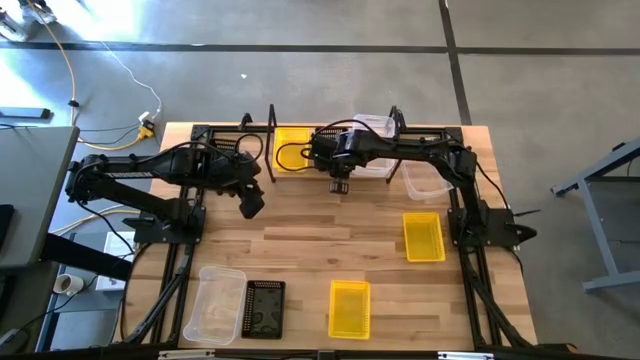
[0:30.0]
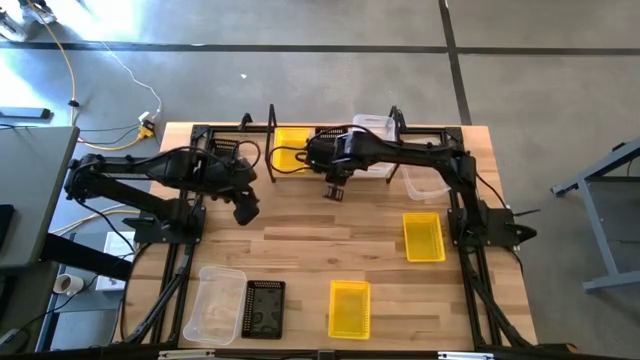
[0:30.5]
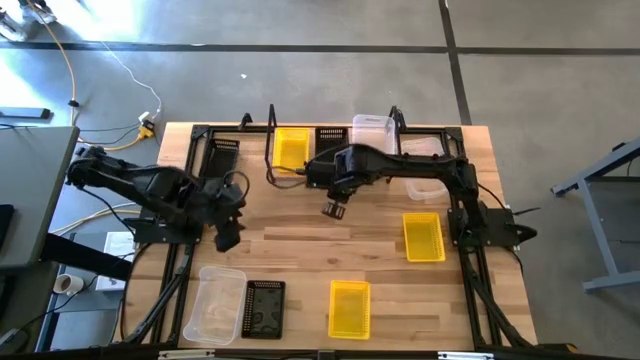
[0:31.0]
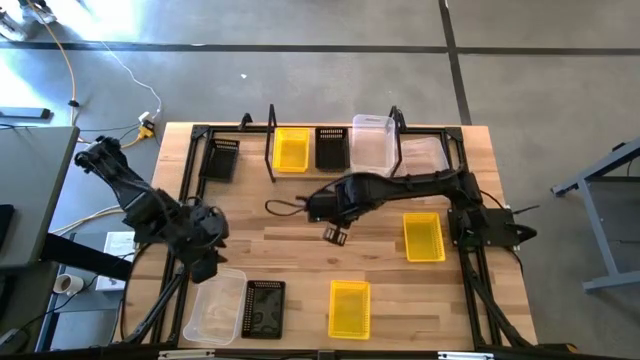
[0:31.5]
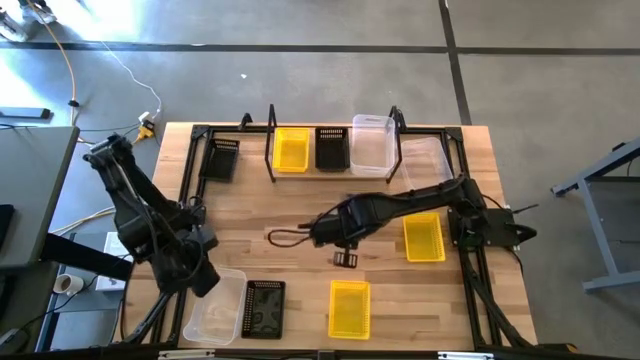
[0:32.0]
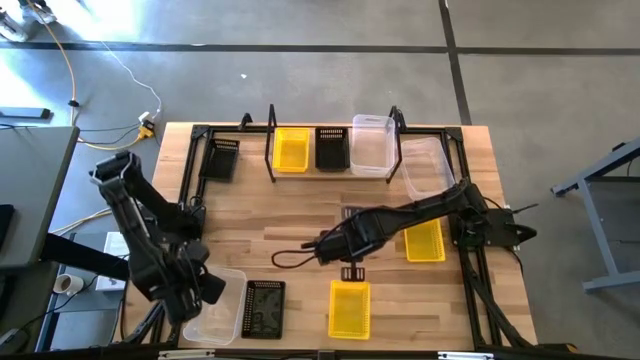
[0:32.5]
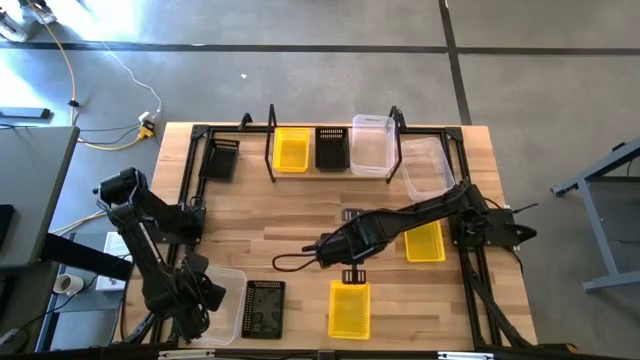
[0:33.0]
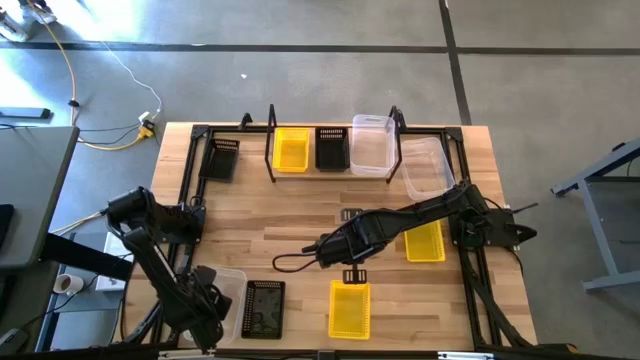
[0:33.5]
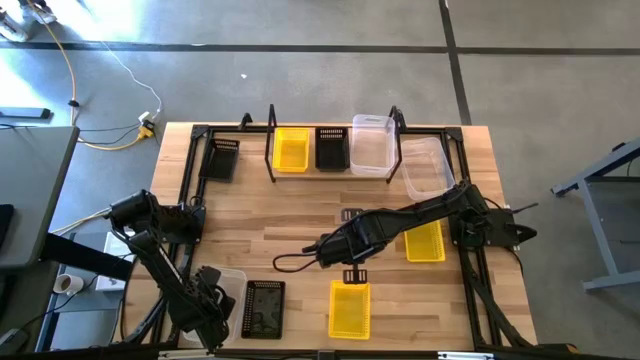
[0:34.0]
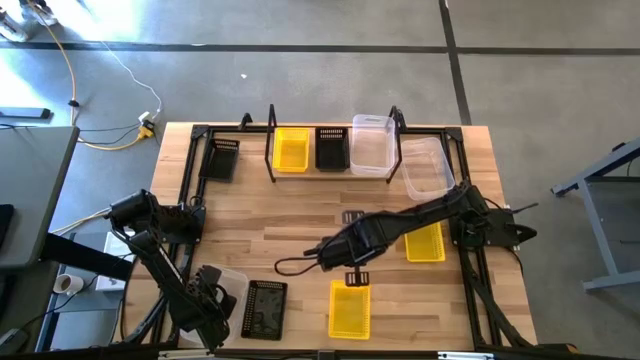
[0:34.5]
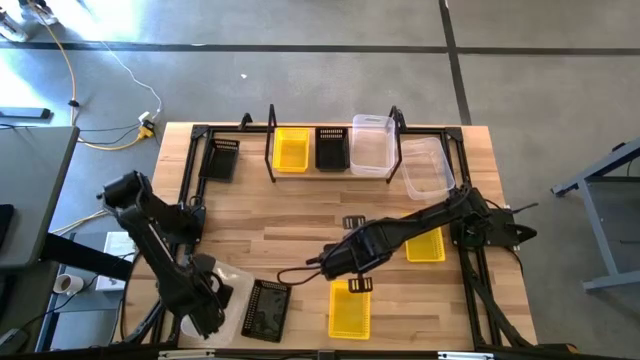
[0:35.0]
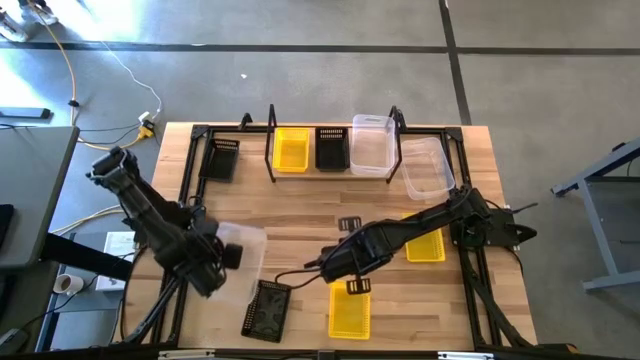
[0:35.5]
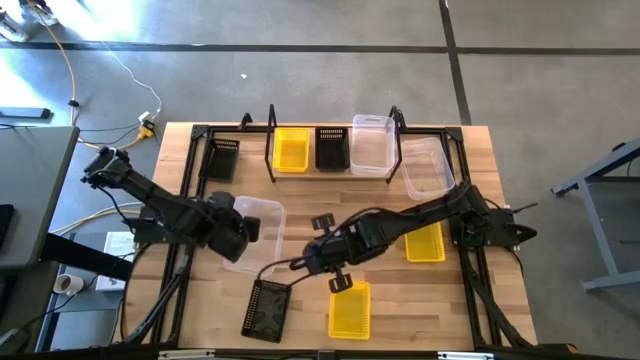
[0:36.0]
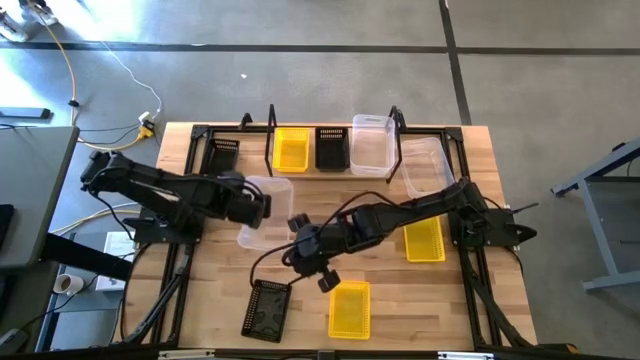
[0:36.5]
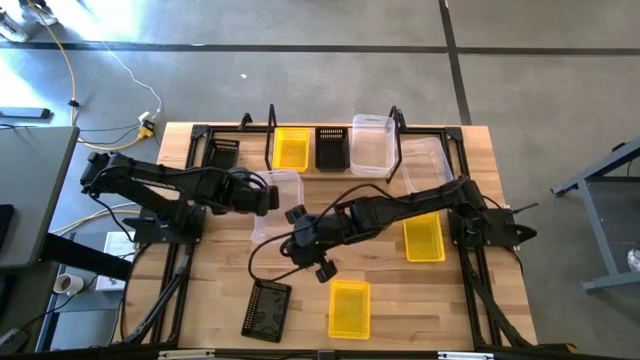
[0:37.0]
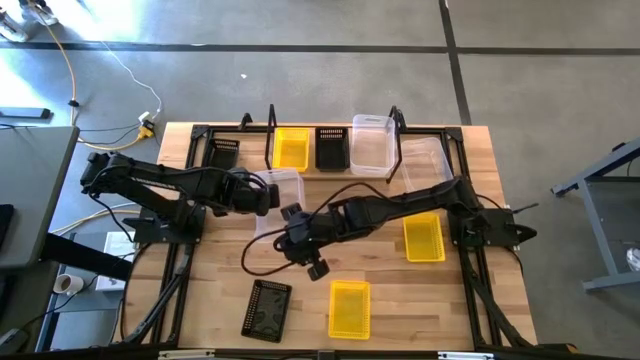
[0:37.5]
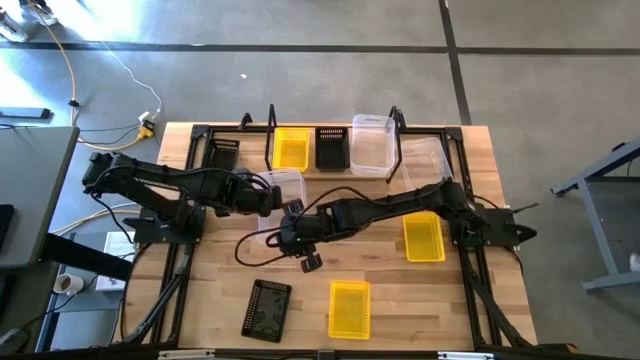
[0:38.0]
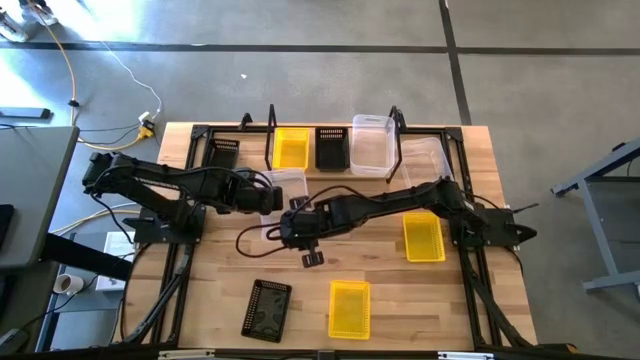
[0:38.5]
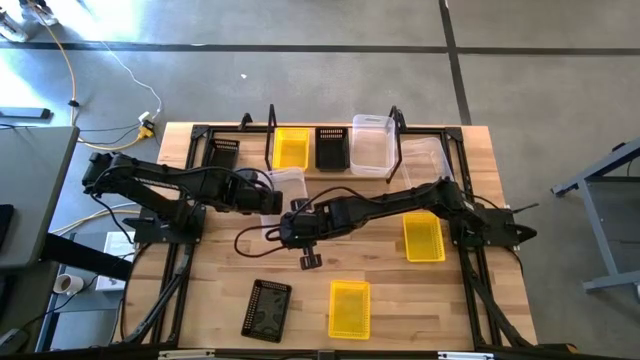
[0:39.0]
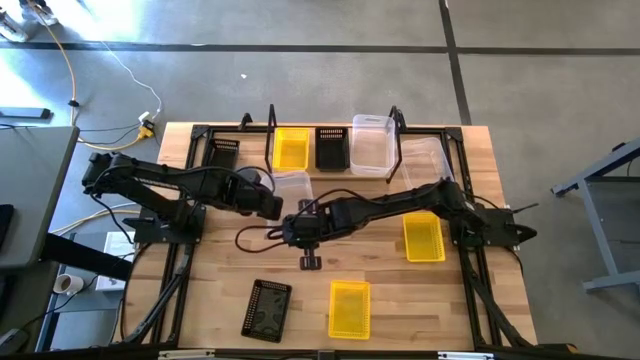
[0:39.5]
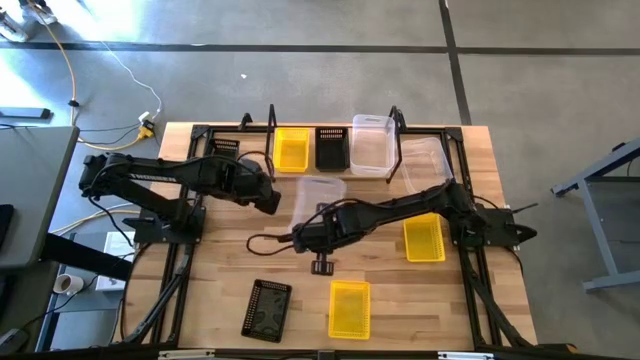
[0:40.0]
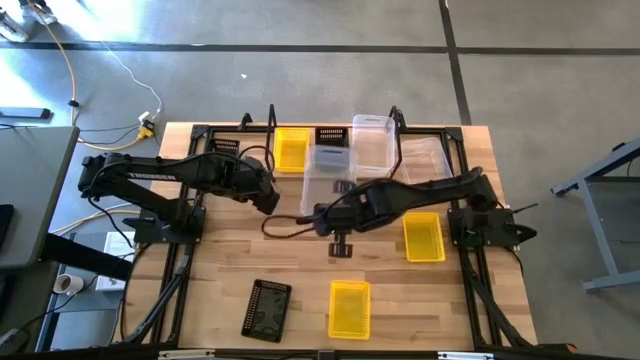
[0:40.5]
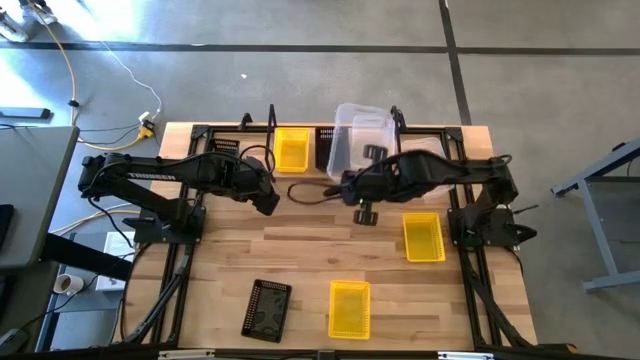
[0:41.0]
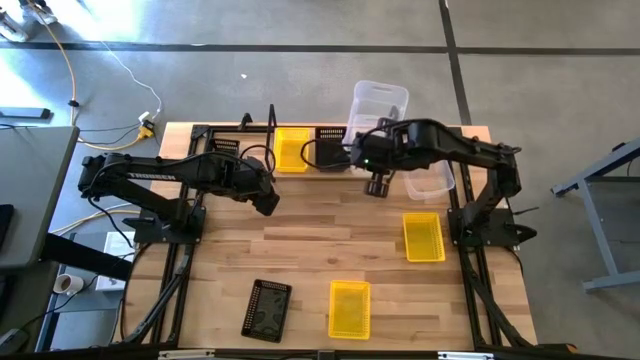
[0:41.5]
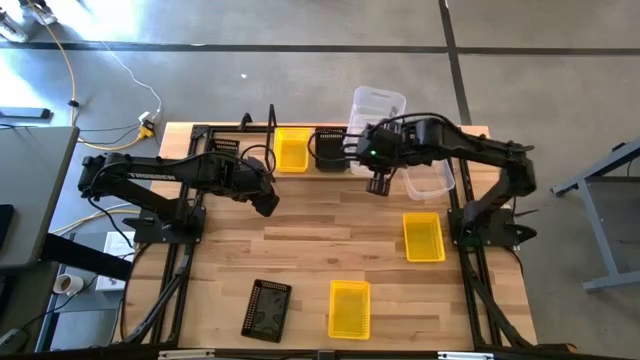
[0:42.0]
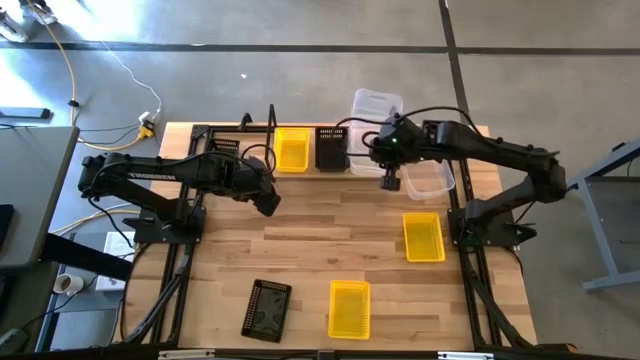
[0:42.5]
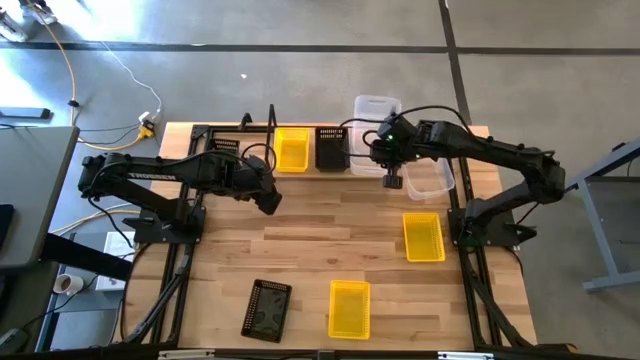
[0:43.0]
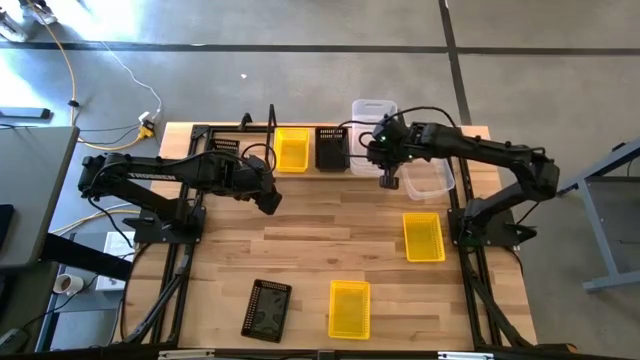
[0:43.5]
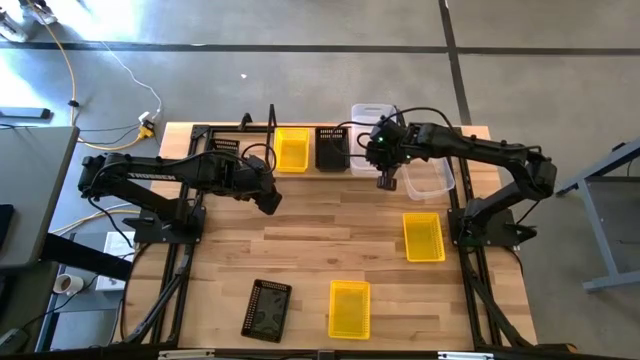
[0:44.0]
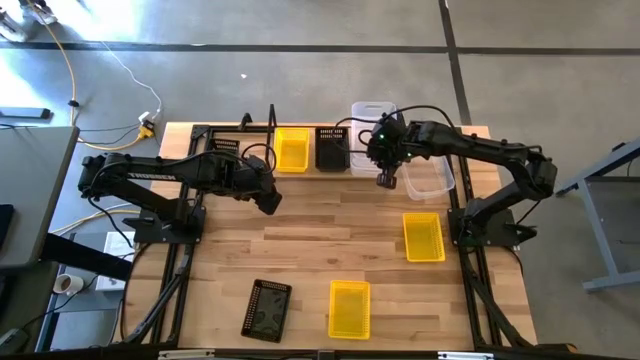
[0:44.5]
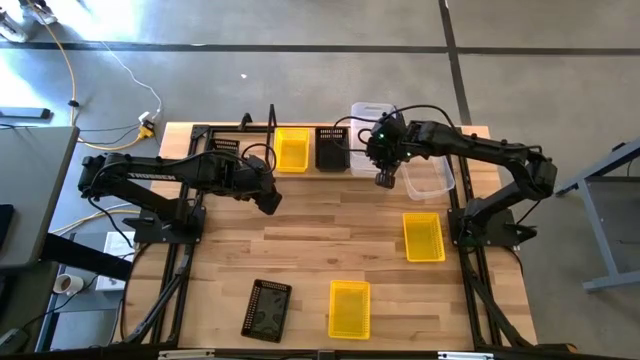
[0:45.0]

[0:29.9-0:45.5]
Task: Stack baskets on shelf by color
Stack the bottom transparent bin on top of the transparent bin on the shelf

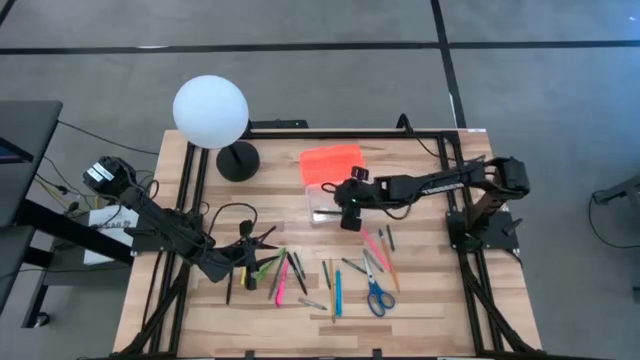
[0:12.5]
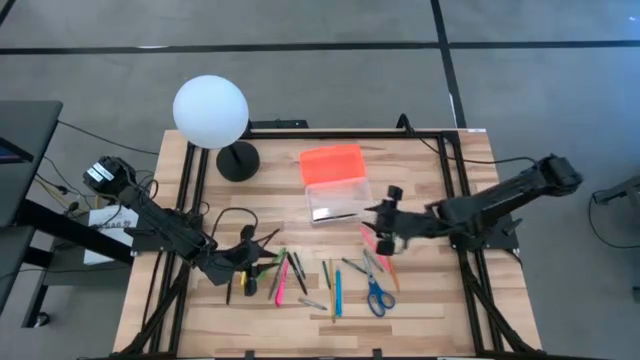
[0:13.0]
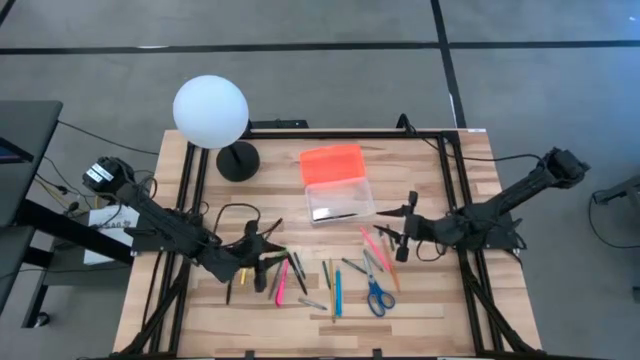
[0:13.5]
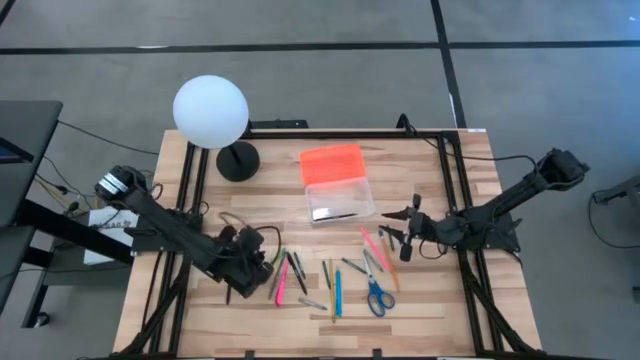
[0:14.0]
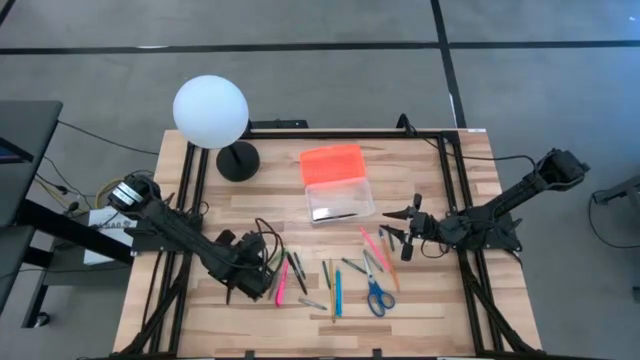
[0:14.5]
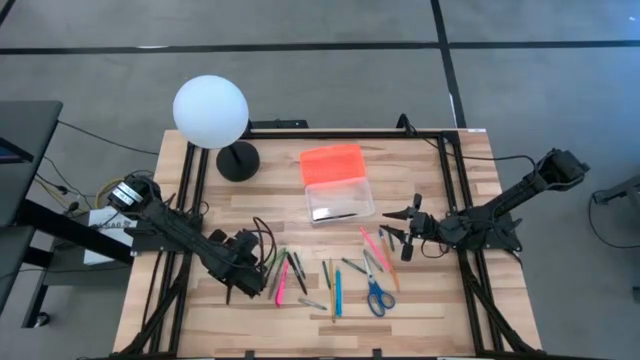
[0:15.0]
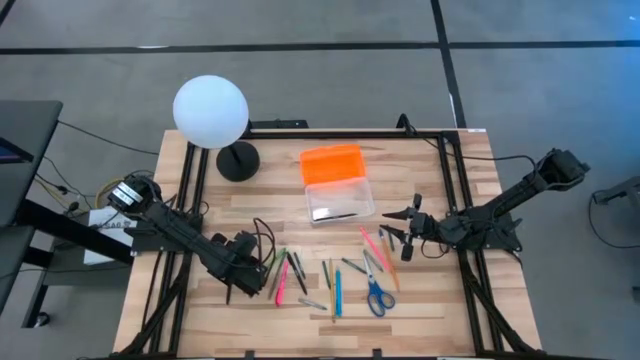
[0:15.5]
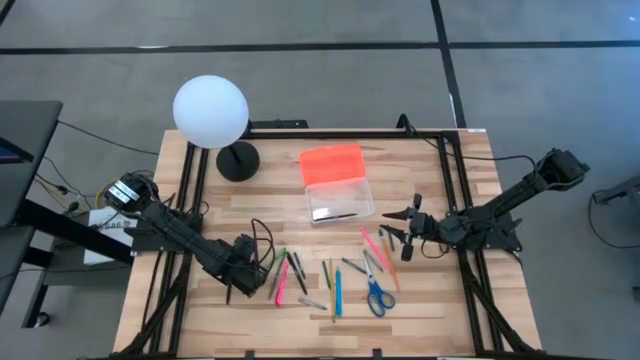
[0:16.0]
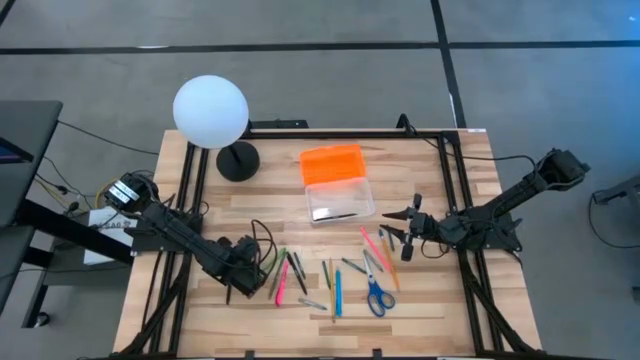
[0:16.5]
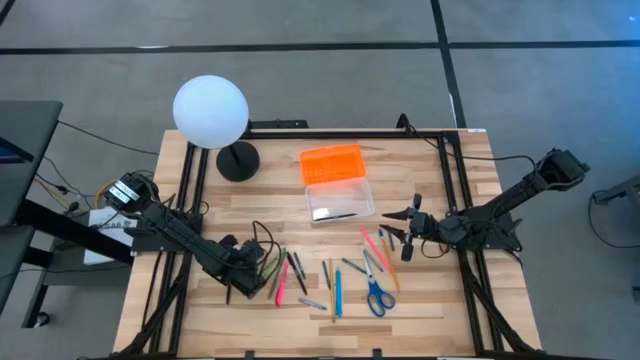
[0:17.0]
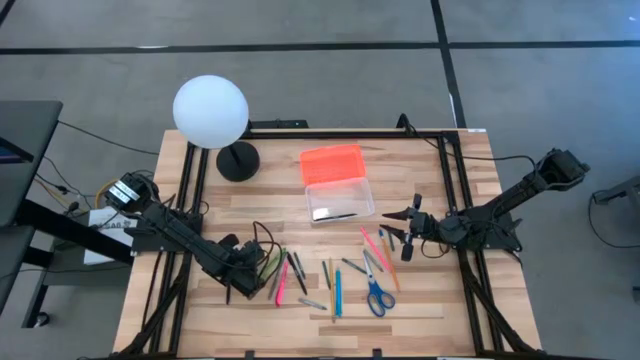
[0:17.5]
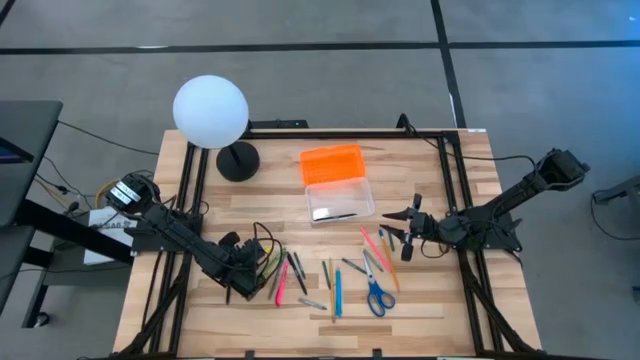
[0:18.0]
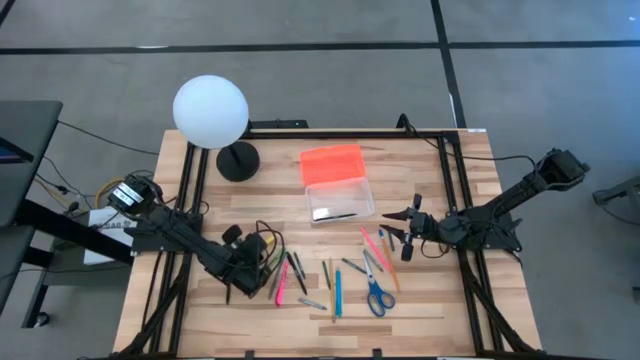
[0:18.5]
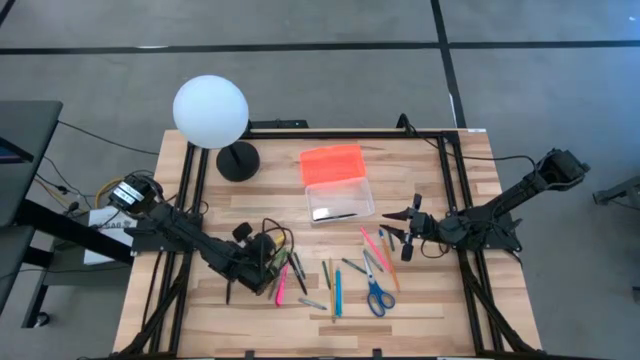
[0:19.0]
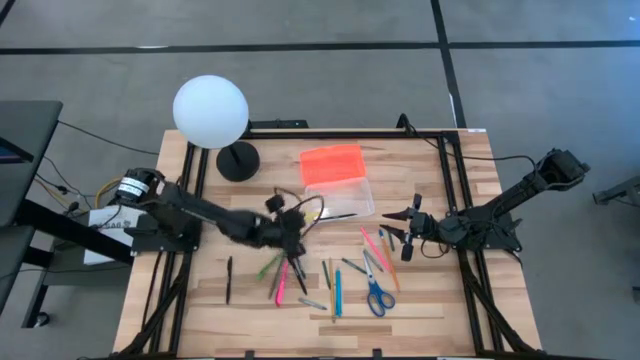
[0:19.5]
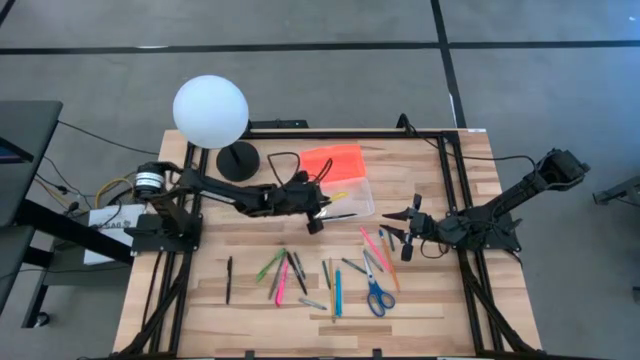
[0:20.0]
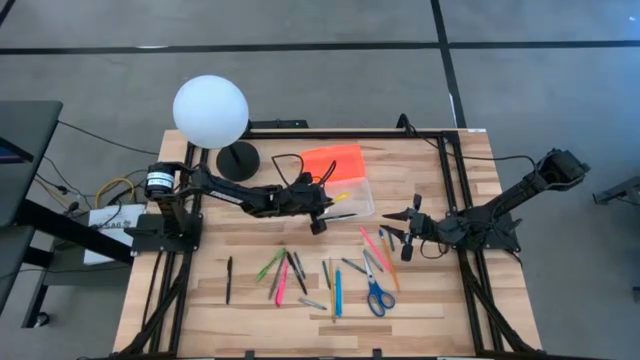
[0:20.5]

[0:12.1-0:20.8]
Task: Pick & place school supplies into a supply box
Put the yellow pen into the orange supply box
